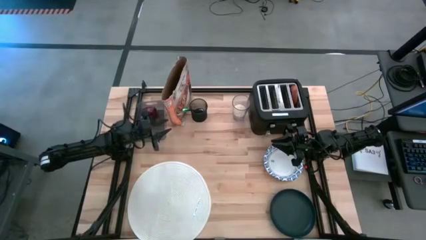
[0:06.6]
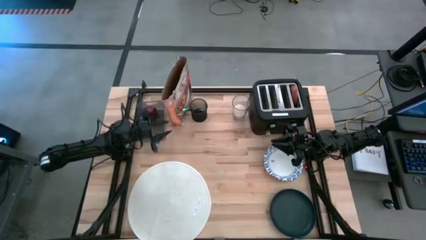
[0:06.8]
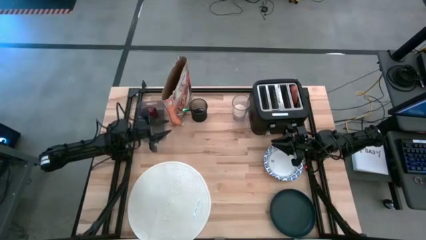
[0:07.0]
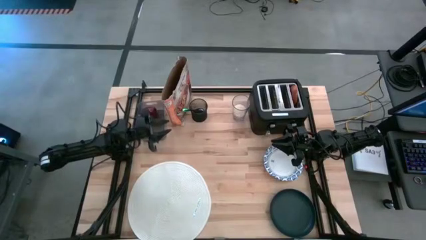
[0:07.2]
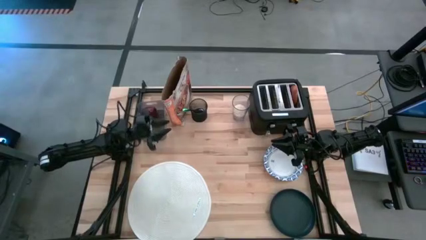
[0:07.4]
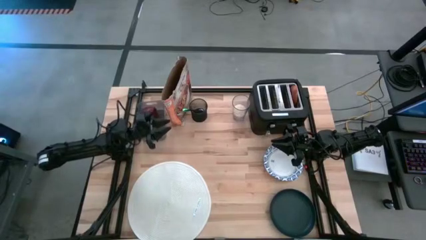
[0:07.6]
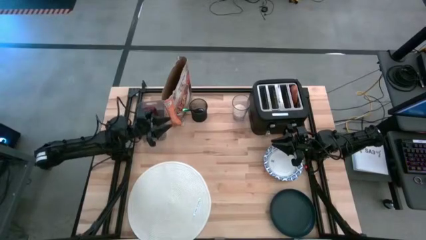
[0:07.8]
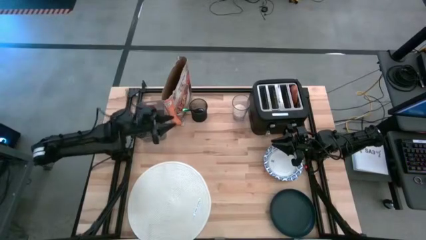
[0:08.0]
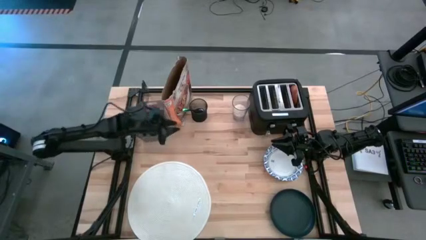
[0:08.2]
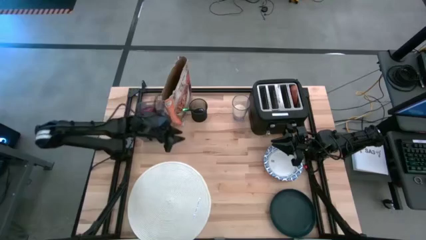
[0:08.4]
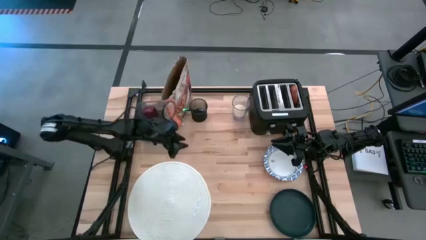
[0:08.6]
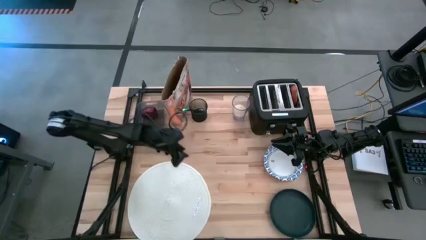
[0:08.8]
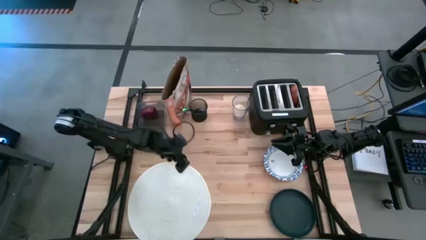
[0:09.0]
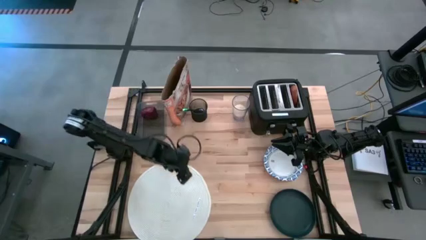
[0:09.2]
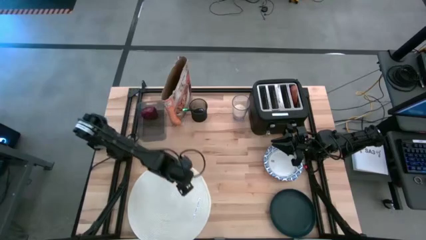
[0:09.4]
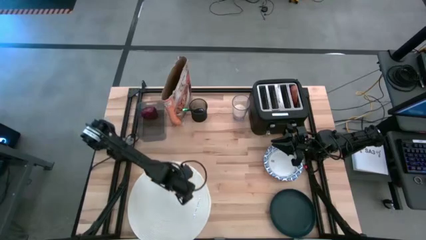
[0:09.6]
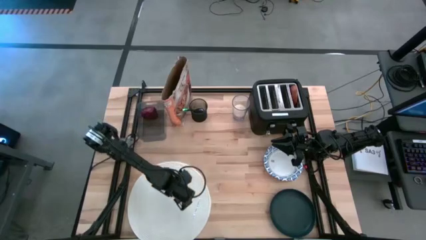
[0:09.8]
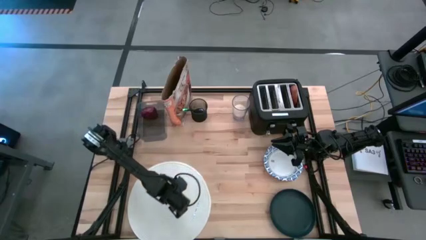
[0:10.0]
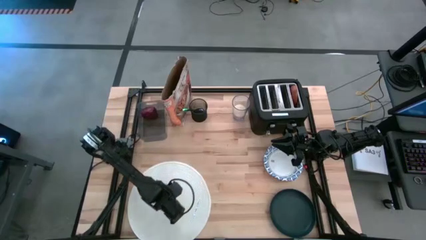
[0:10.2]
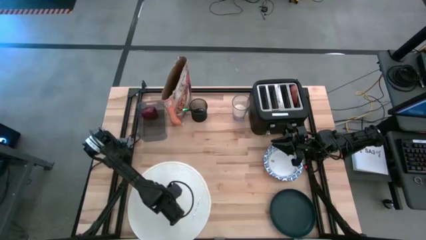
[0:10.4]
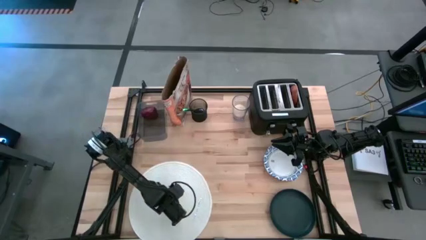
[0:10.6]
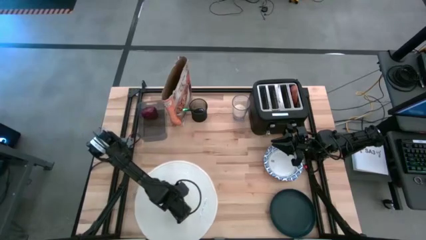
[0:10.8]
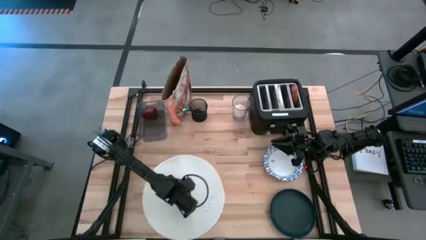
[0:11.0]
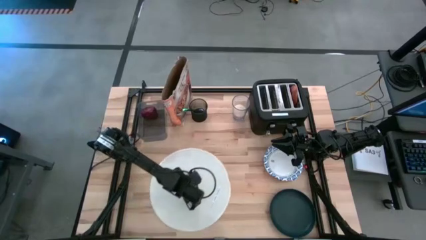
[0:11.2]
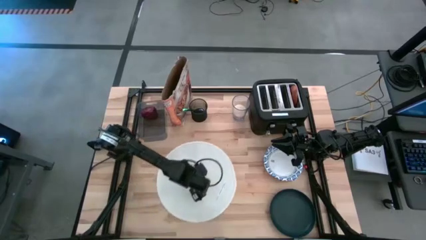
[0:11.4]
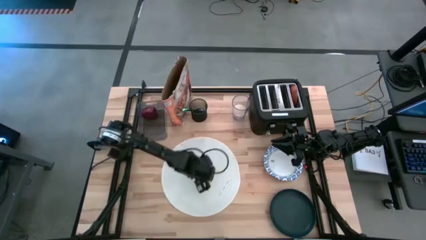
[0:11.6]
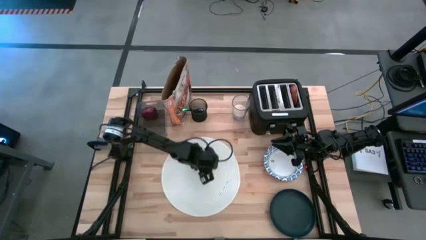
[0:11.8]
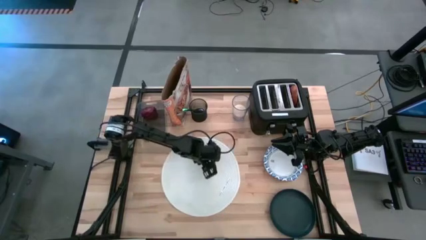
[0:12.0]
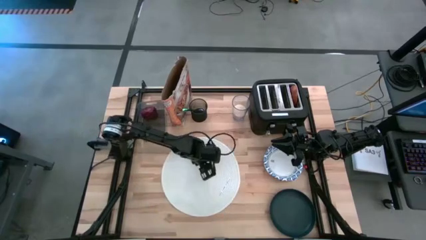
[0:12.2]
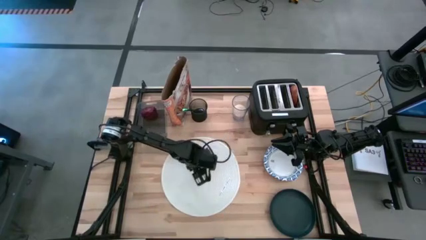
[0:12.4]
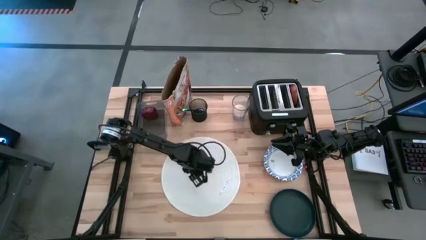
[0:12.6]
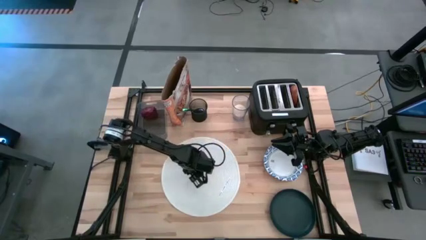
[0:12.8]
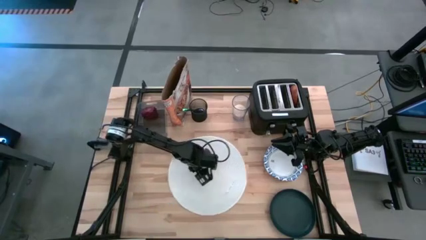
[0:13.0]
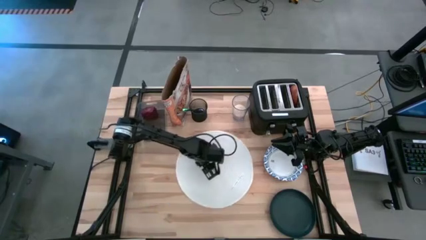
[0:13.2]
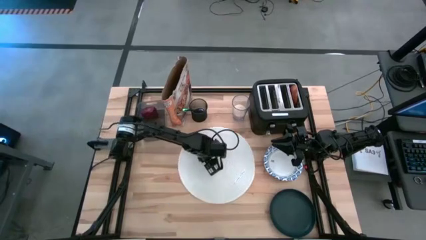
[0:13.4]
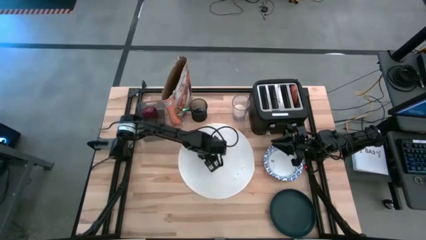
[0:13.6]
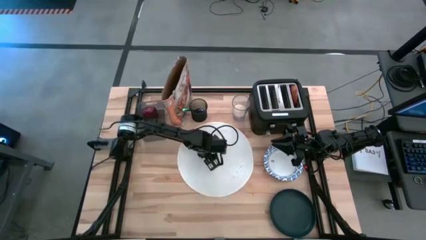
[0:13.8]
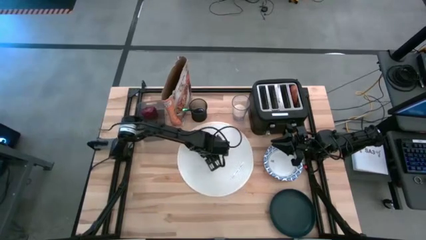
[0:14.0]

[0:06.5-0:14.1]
Task: Arrange a breakfast setting
Move the white placemat to the center of the table

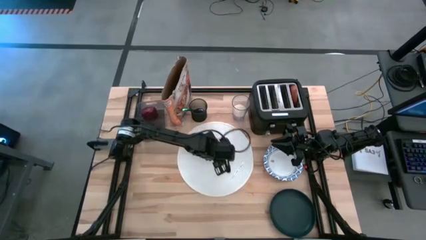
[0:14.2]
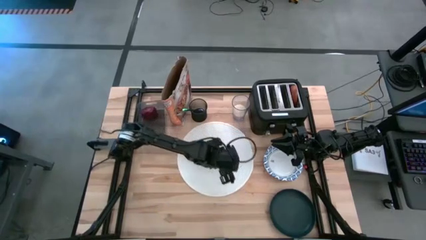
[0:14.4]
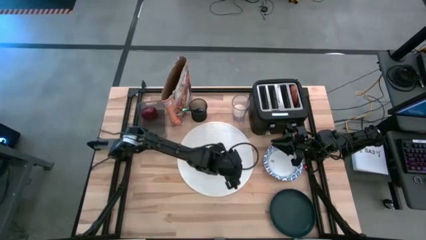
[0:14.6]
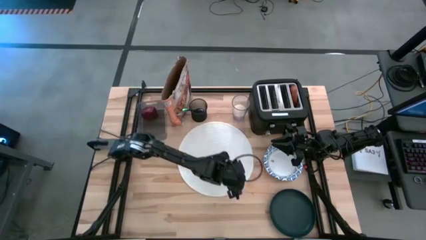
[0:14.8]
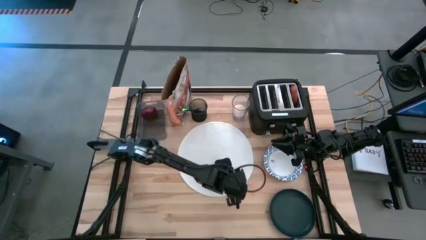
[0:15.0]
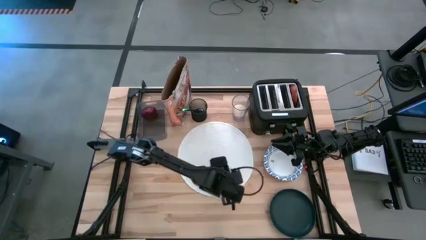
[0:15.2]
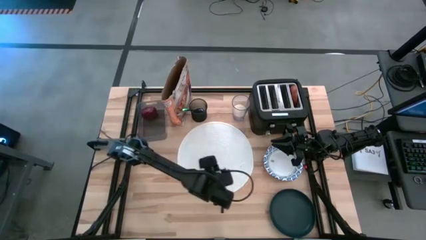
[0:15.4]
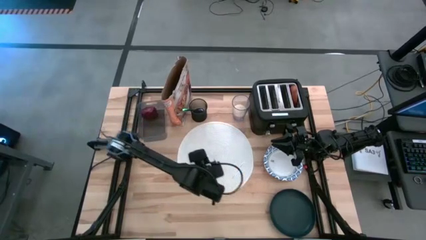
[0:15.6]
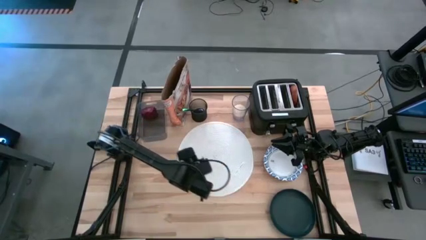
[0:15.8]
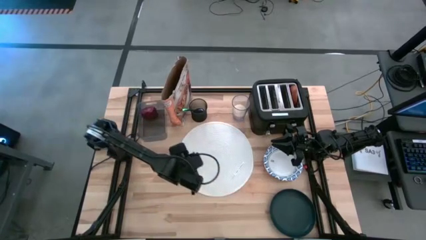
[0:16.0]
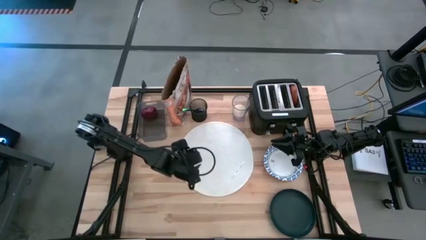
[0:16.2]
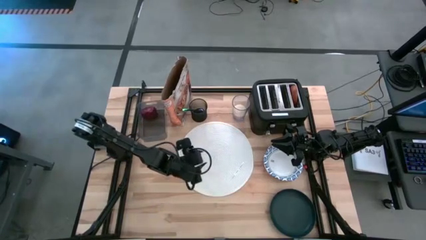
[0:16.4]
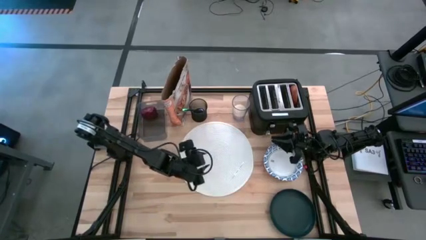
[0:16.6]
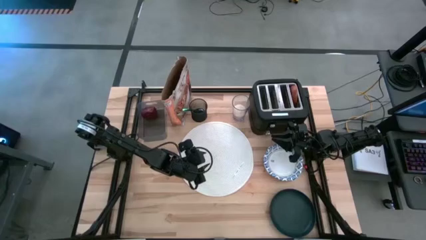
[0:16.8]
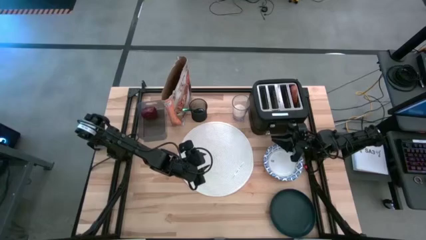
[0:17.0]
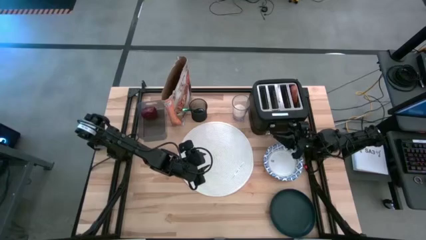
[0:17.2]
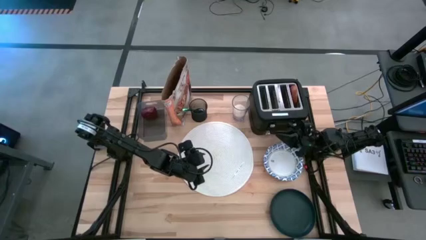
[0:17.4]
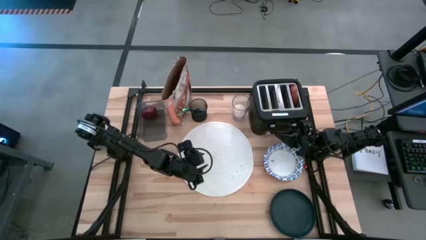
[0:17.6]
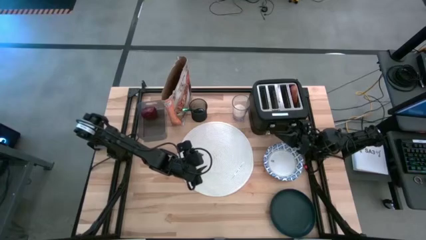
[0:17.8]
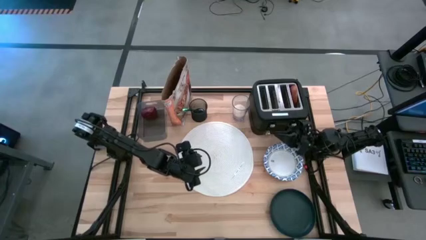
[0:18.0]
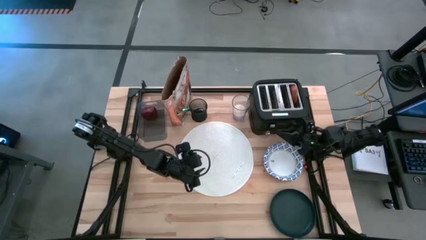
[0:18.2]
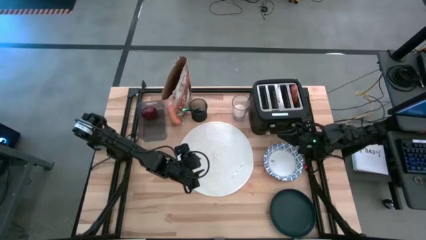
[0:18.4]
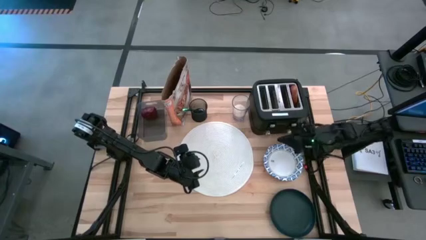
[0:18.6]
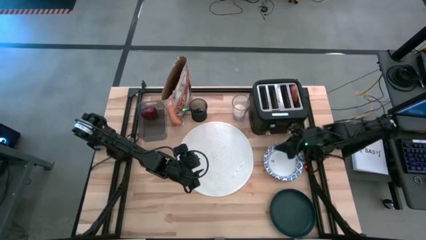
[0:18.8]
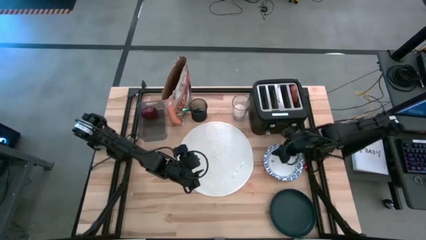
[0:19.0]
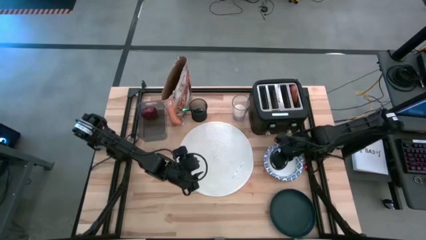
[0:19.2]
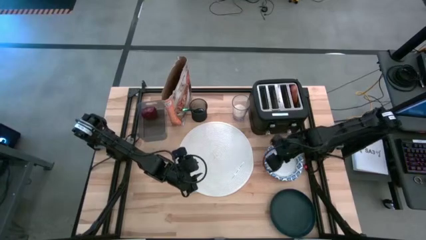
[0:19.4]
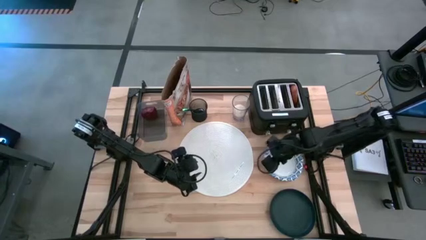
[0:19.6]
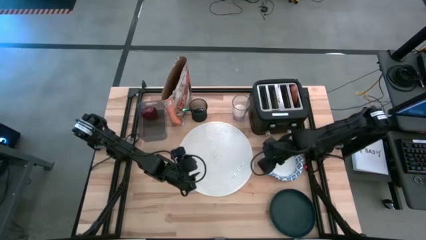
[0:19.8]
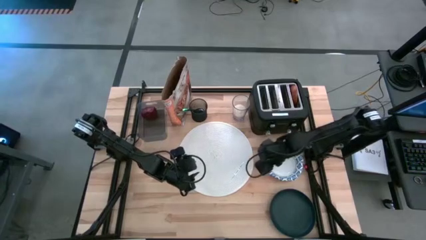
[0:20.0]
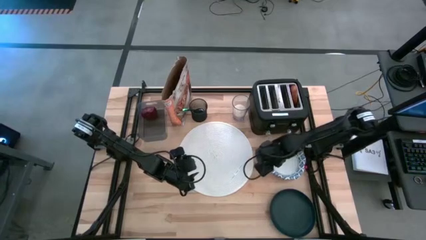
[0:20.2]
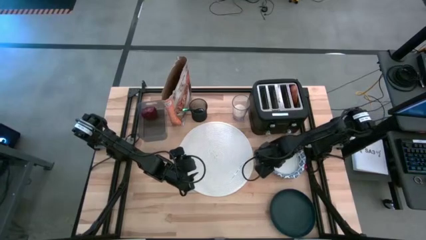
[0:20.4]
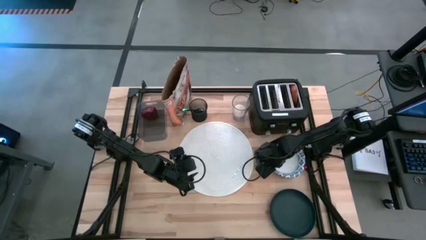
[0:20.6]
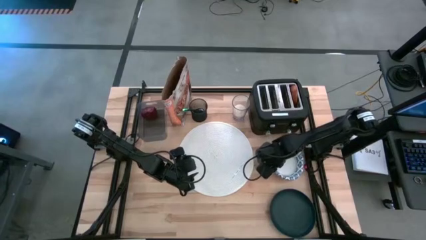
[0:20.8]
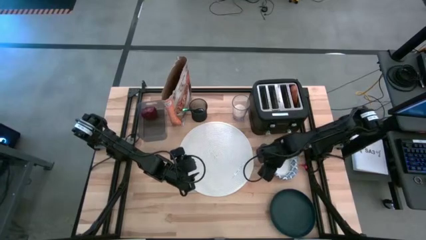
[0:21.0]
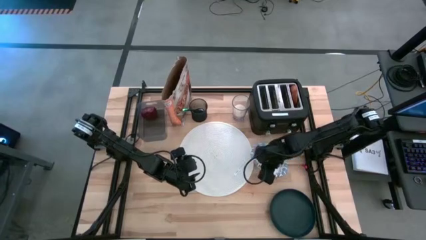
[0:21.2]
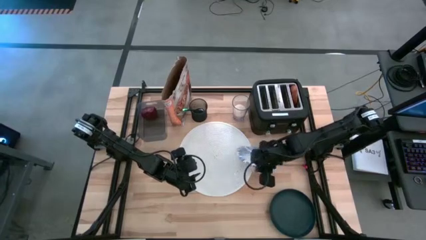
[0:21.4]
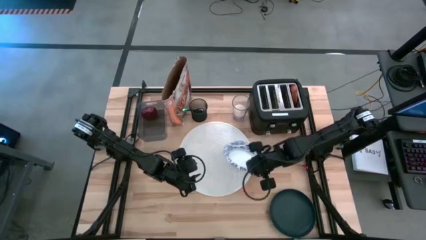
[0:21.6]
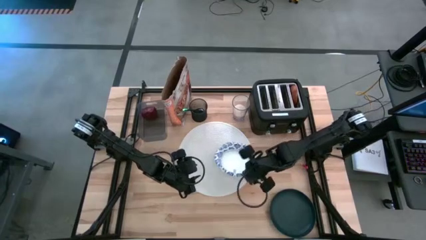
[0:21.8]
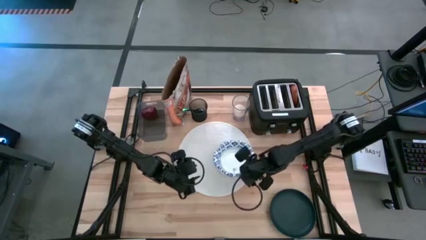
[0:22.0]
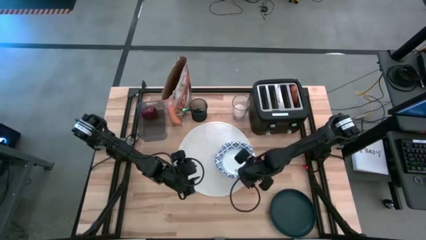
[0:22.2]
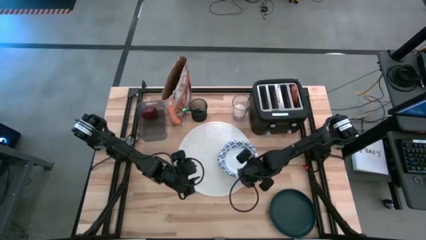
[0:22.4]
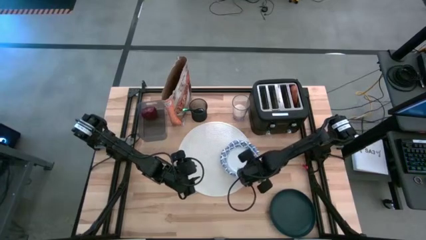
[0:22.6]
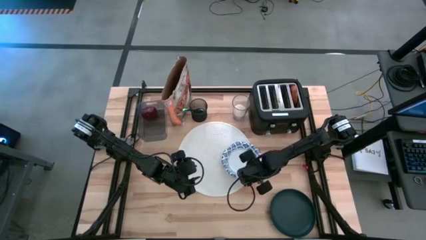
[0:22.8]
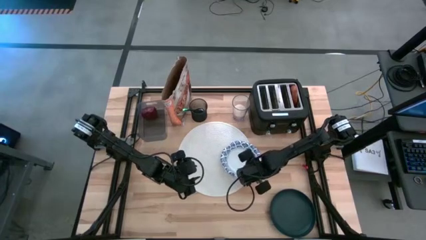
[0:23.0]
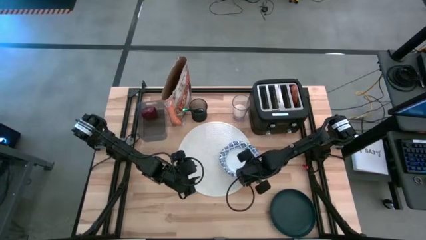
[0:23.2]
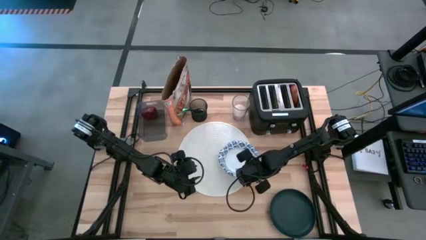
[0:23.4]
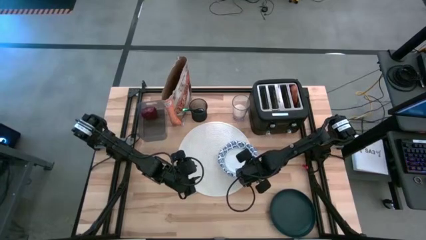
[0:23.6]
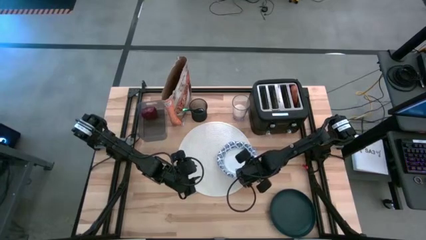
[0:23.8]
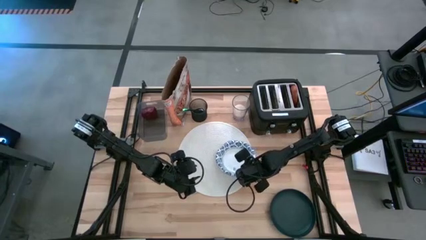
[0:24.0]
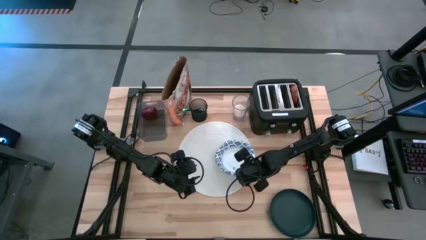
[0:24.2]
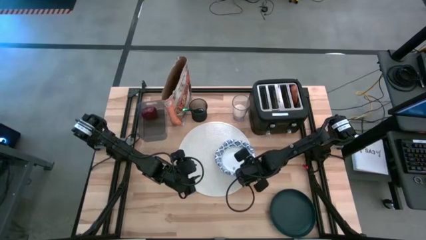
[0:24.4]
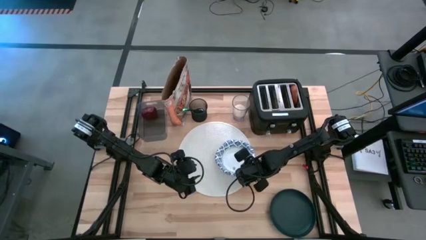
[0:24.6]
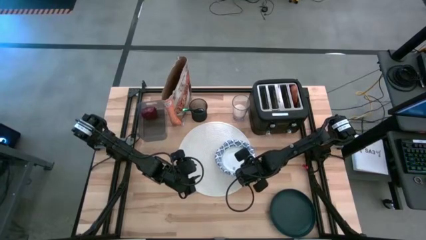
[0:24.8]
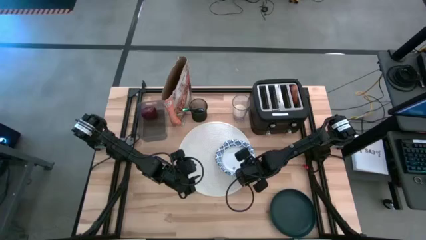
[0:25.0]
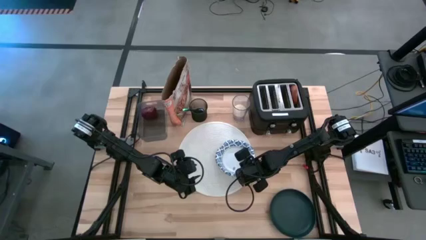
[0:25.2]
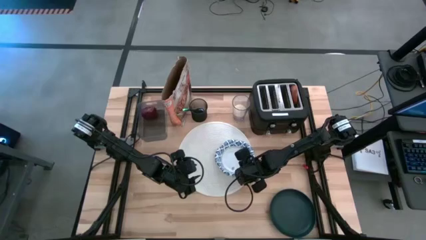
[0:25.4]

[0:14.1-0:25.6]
Put the white patterned bowl on the white placemat
